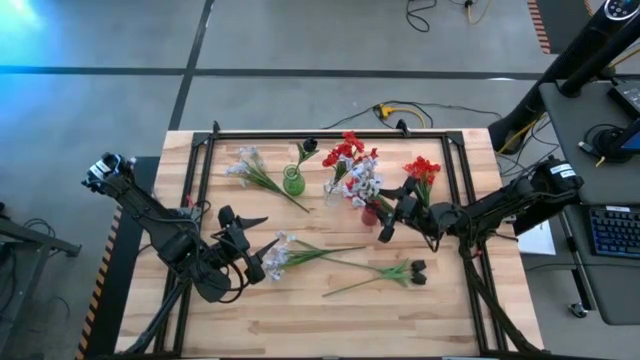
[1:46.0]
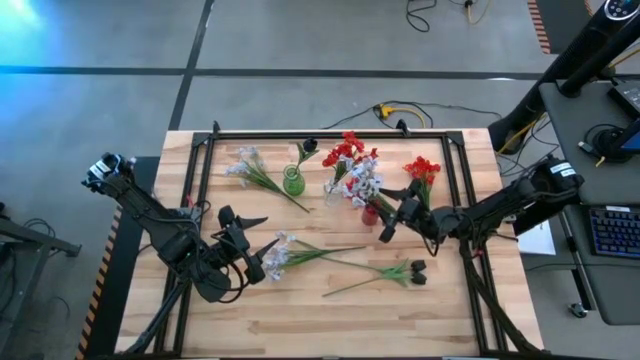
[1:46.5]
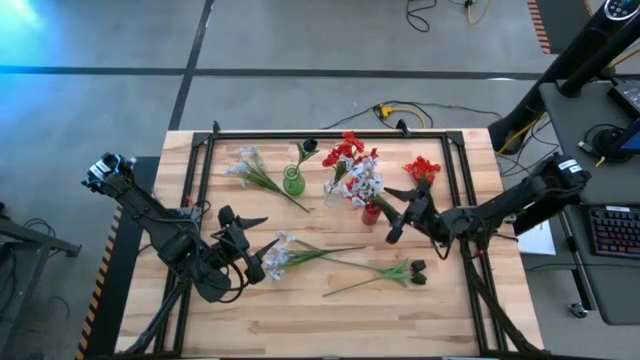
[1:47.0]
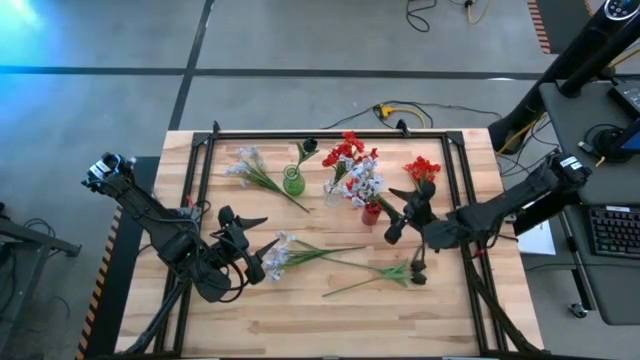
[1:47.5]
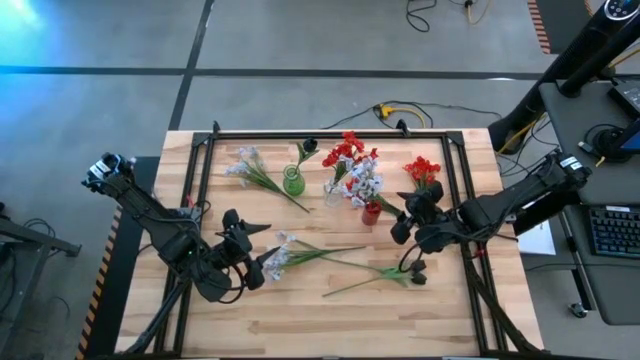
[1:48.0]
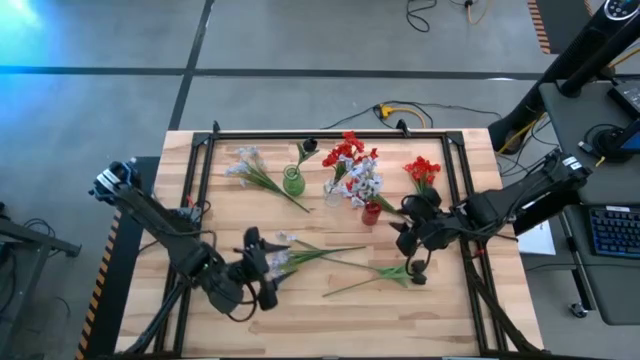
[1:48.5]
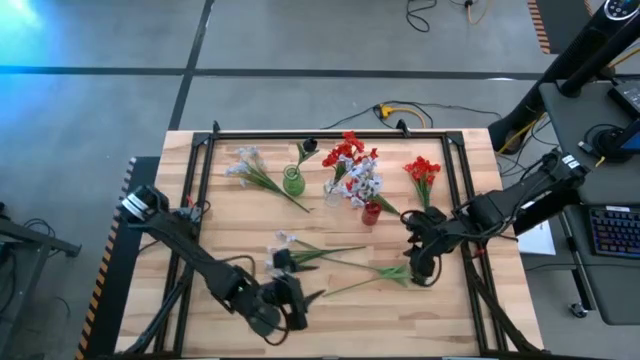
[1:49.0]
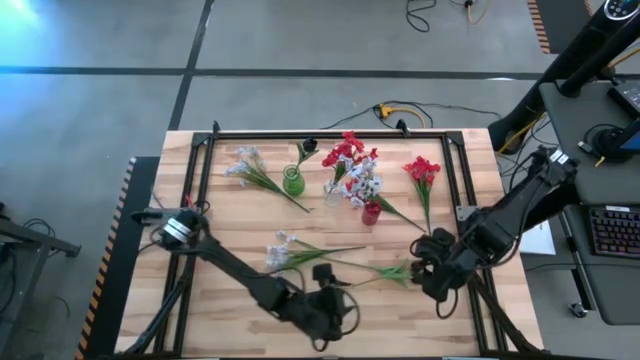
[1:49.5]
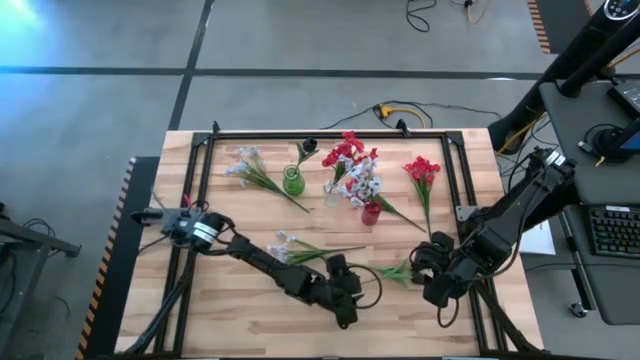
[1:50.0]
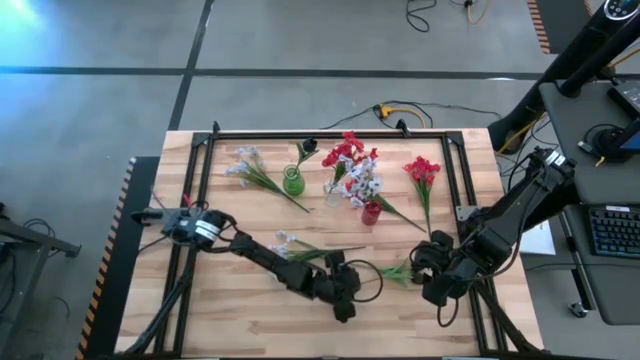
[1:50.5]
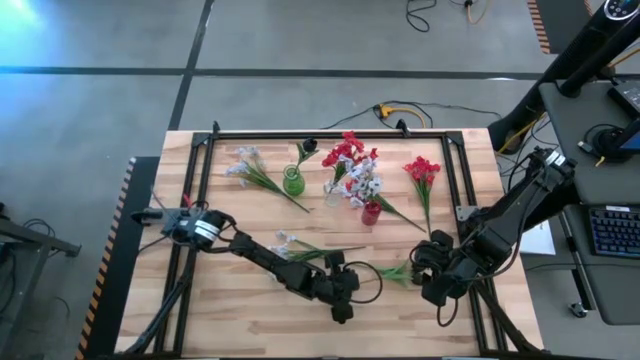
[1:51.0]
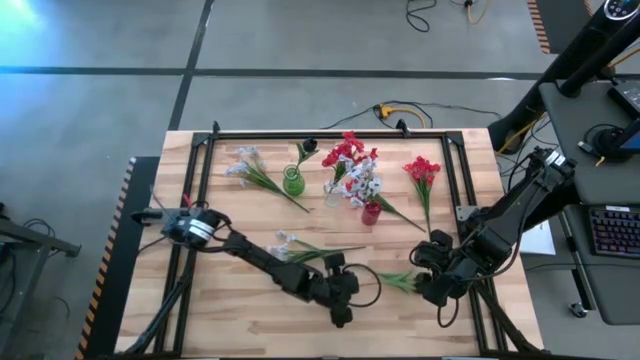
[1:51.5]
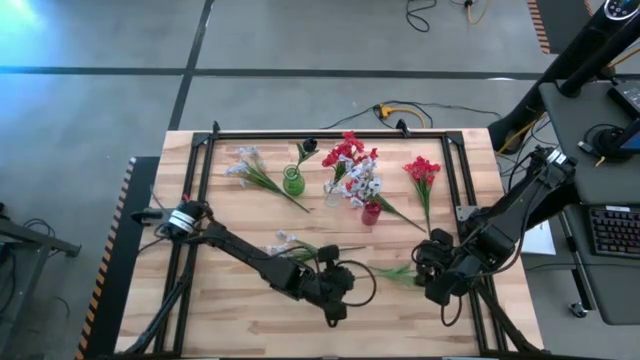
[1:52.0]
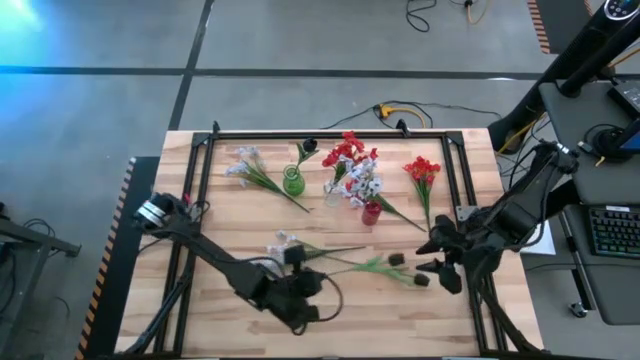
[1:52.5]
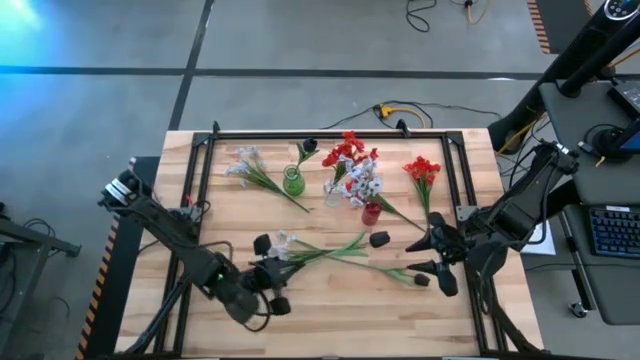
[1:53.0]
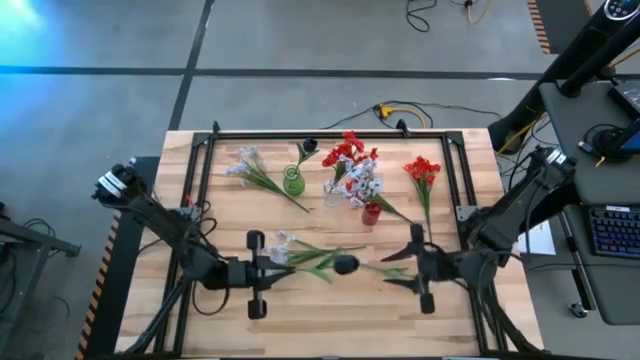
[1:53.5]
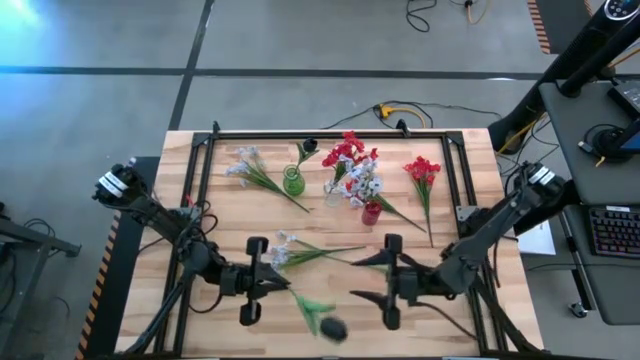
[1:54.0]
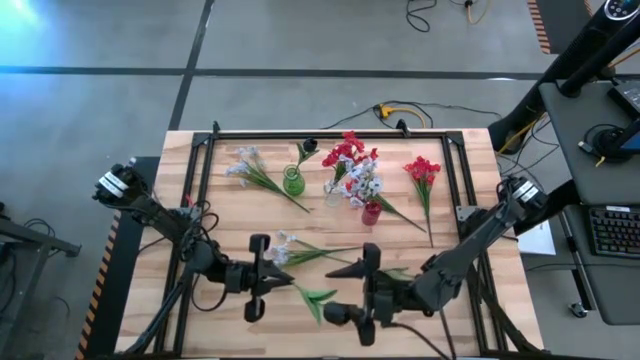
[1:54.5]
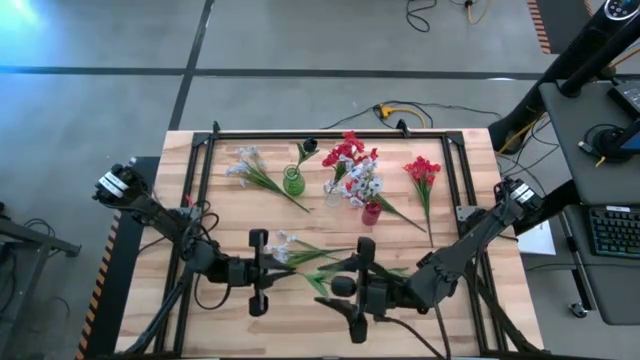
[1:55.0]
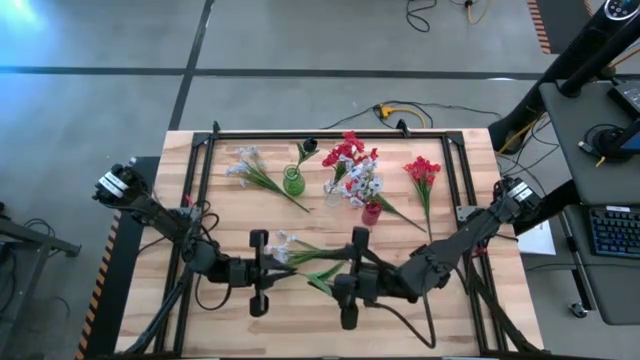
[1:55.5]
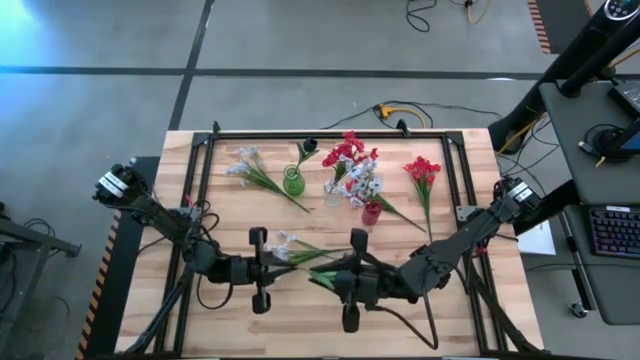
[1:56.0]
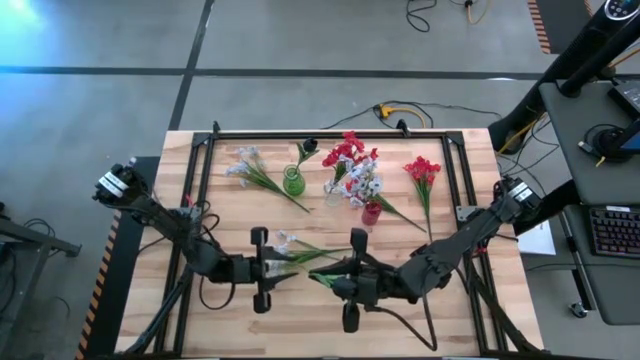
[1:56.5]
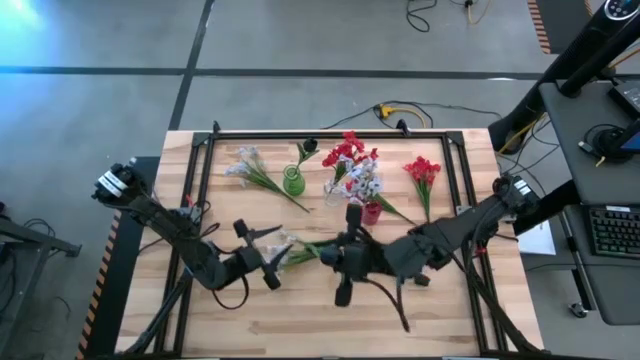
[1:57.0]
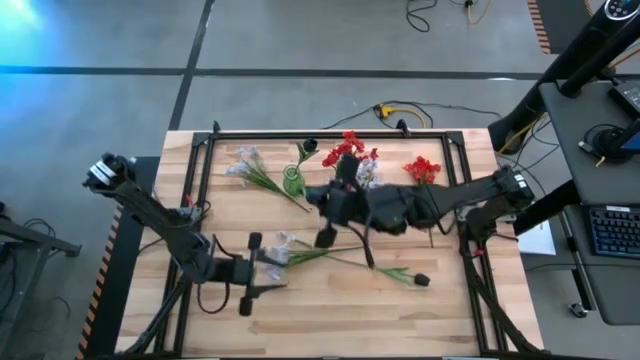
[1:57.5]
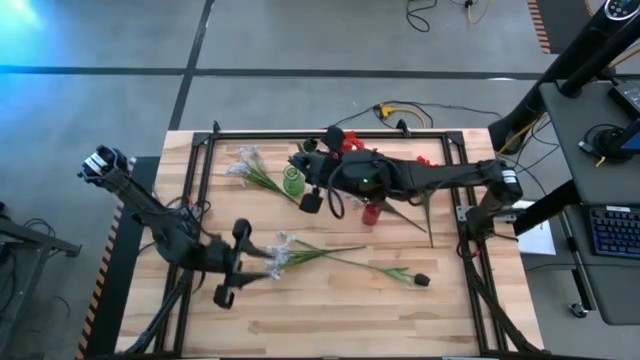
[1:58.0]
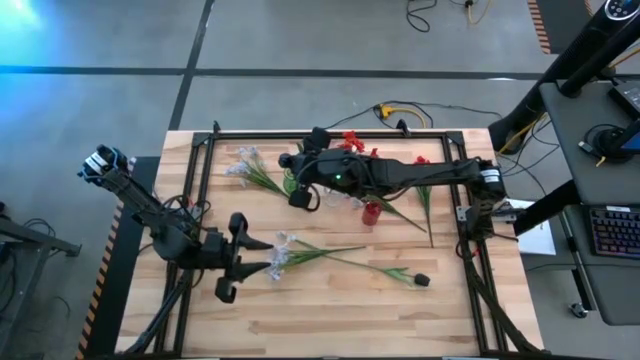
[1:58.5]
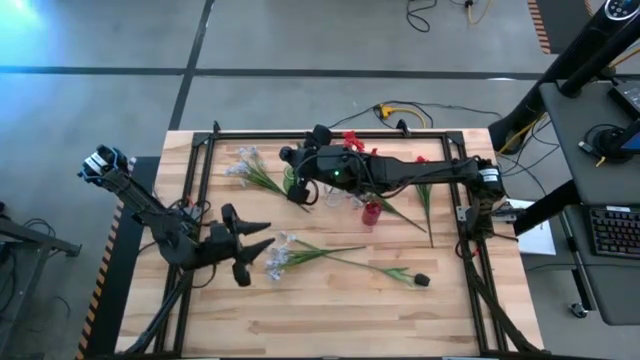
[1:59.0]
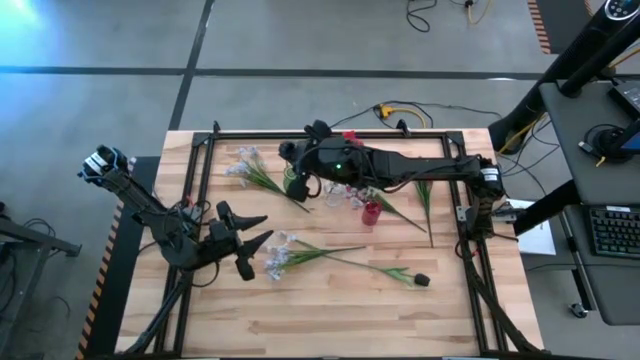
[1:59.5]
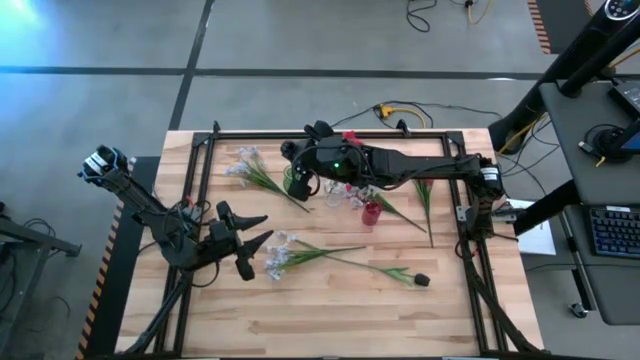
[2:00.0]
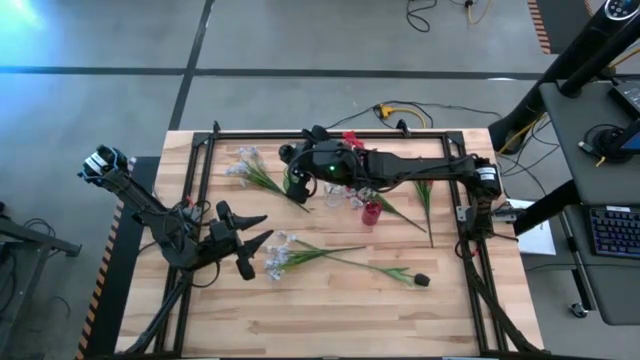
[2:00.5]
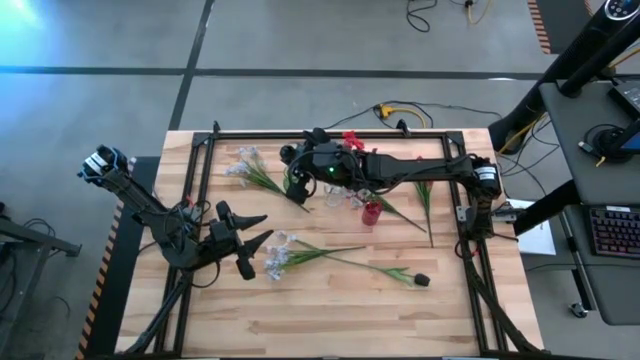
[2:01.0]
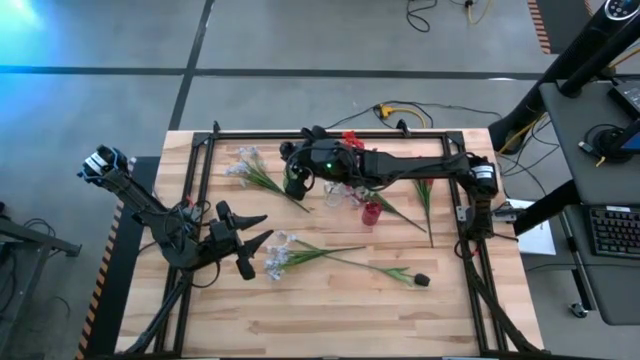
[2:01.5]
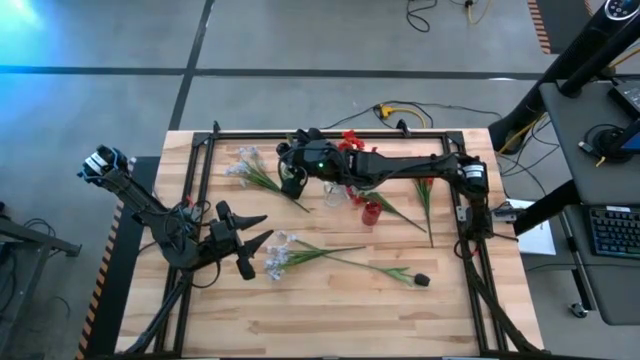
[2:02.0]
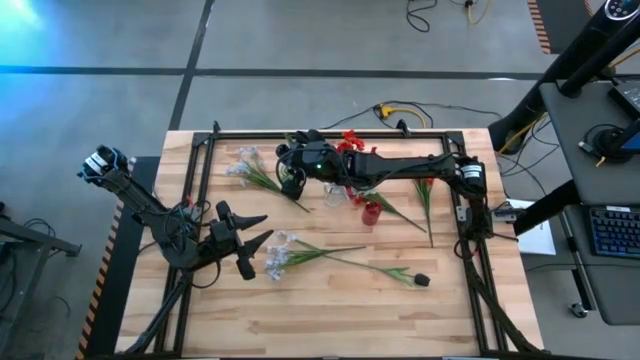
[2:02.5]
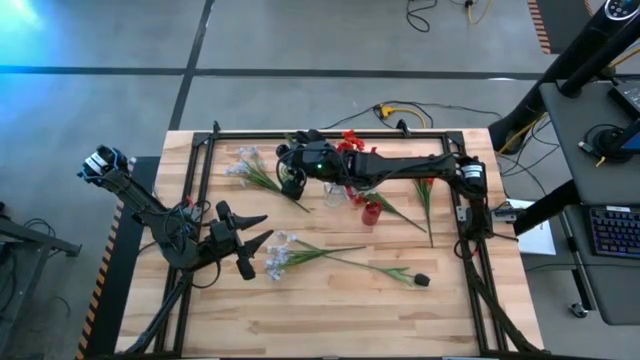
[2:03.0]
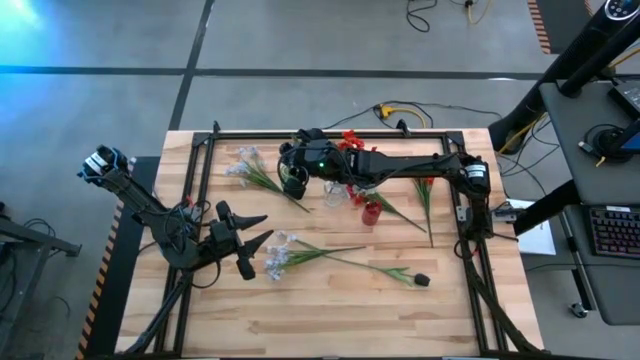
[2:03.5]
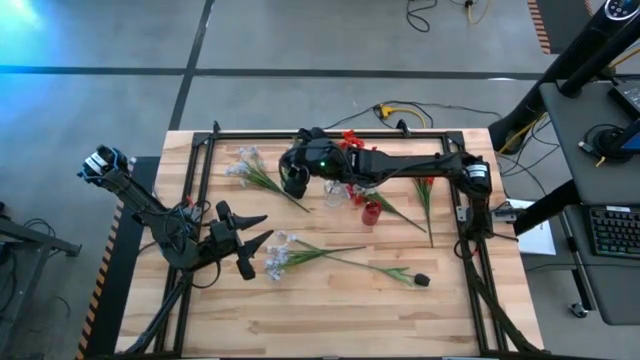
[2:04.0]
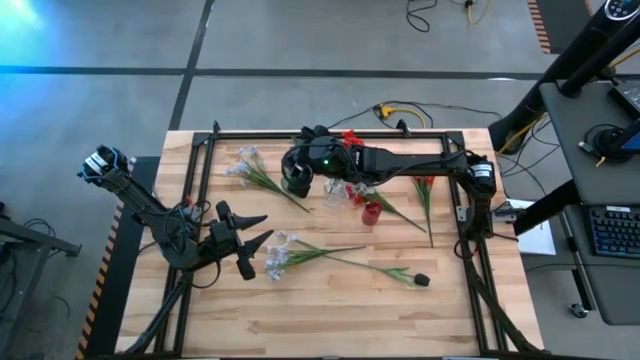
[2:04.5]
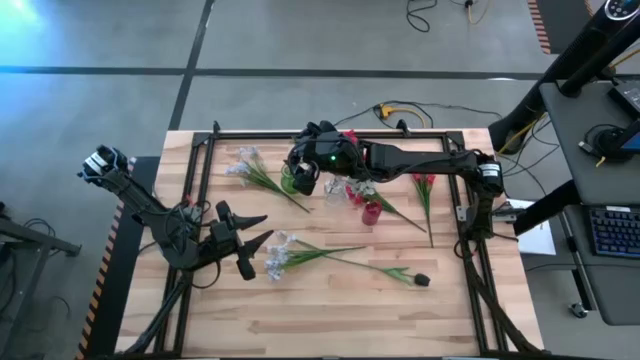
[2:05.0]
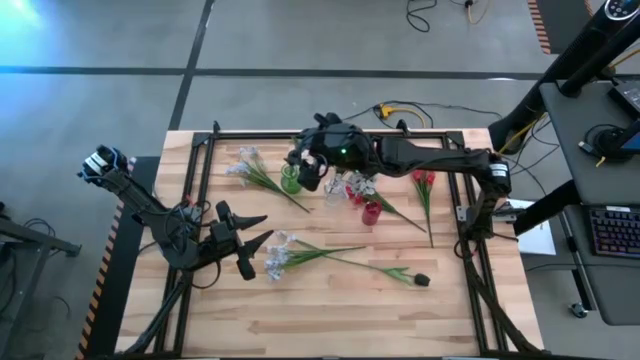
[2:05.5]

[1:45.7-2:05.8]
Task: Sort flowers into vase by color
Put the bottom black tulip into the green vase

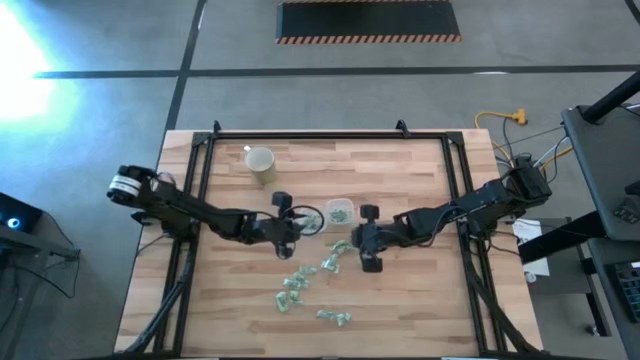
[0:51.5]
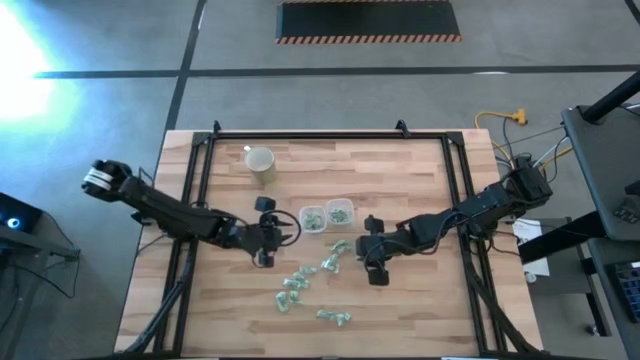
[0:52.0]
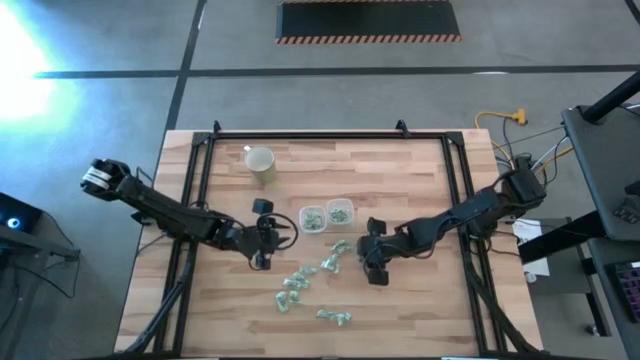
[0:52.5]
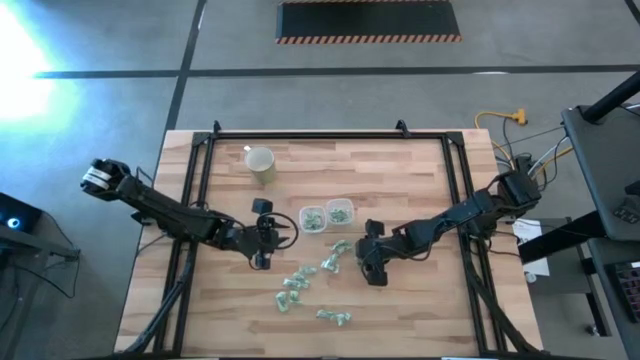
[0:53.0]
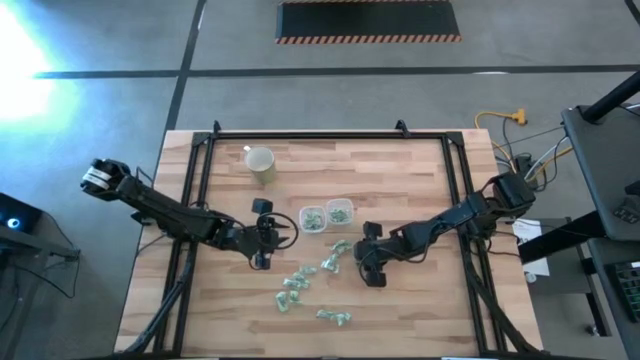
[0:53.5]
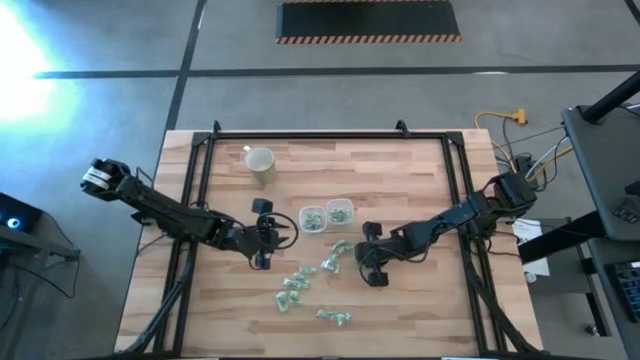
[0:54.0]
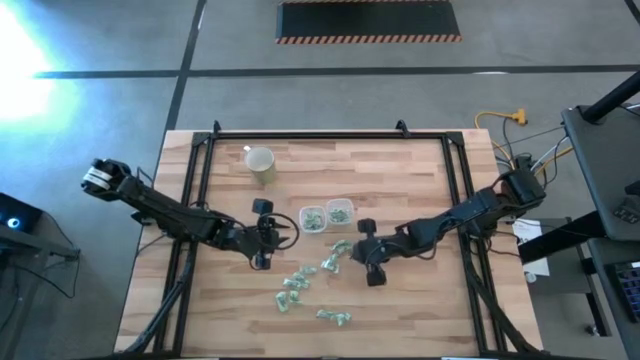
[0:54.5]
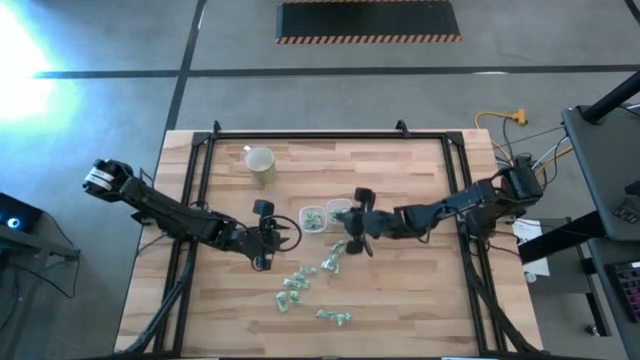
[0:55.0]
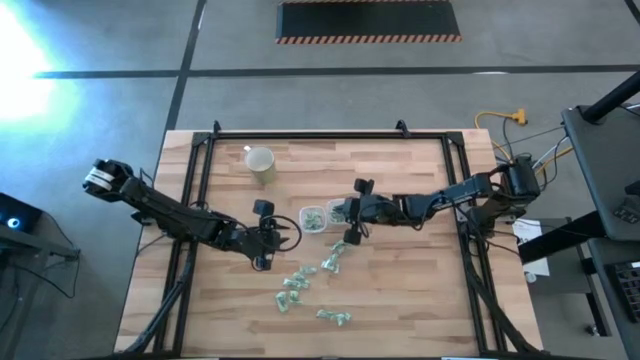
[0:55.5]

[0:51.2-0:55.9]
Task: Pick and place items into bin
Put the stevia packet into the right transparent bin
